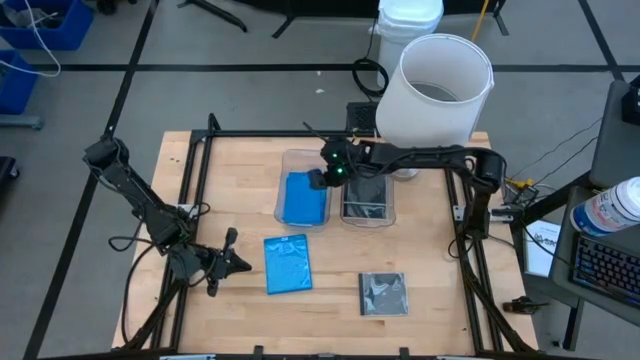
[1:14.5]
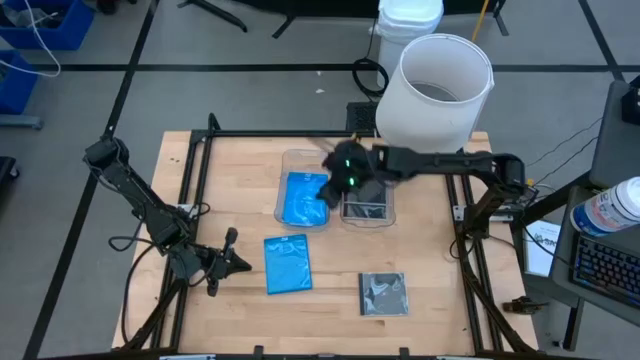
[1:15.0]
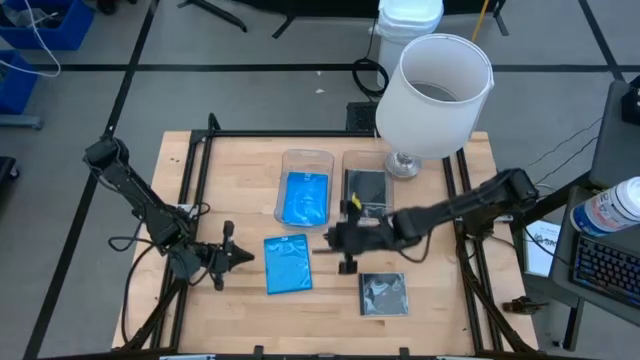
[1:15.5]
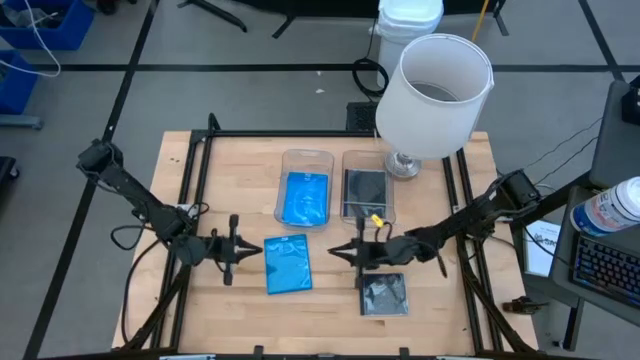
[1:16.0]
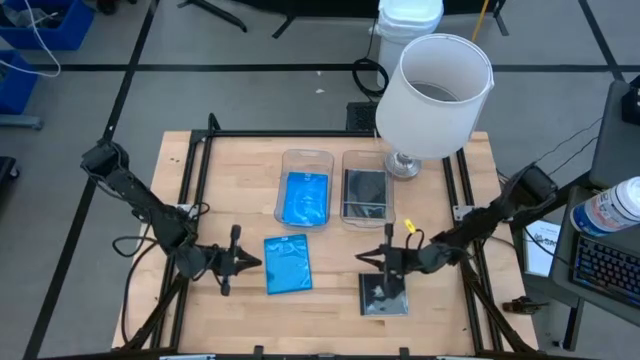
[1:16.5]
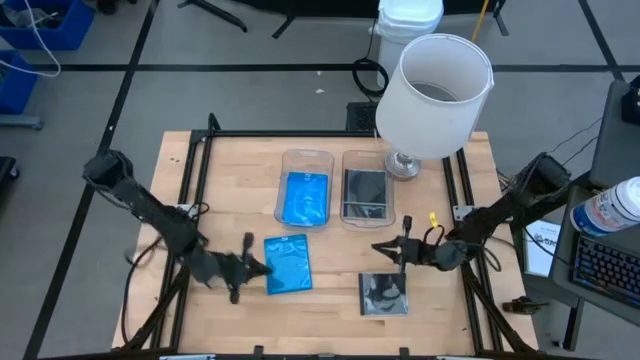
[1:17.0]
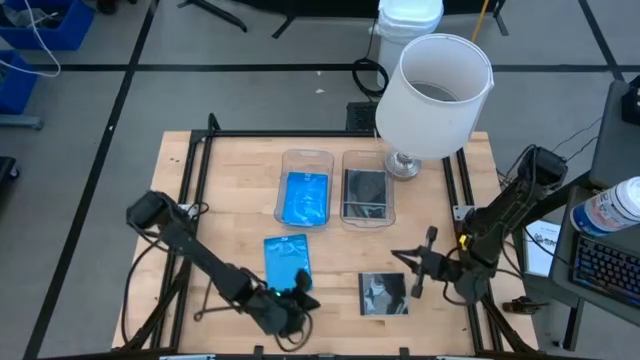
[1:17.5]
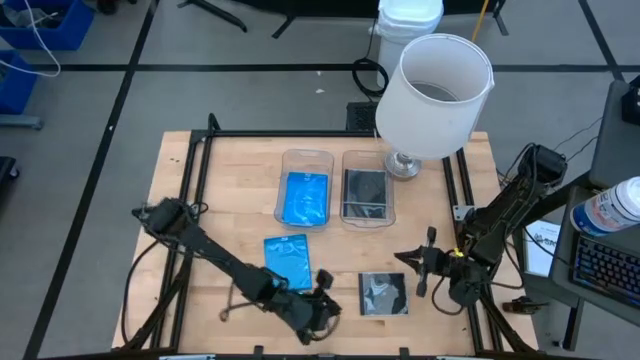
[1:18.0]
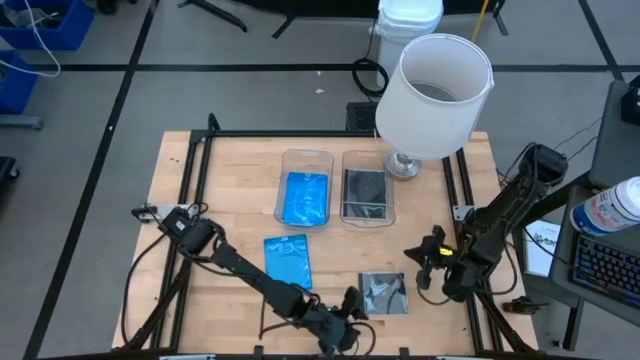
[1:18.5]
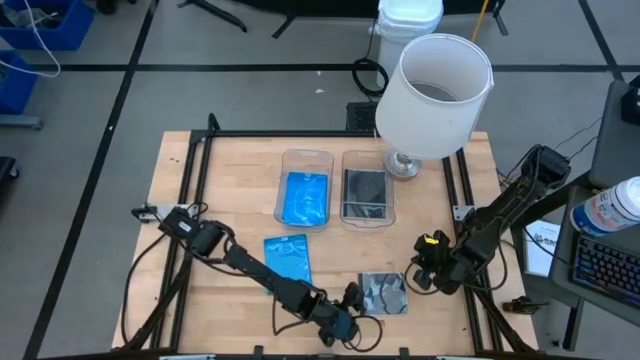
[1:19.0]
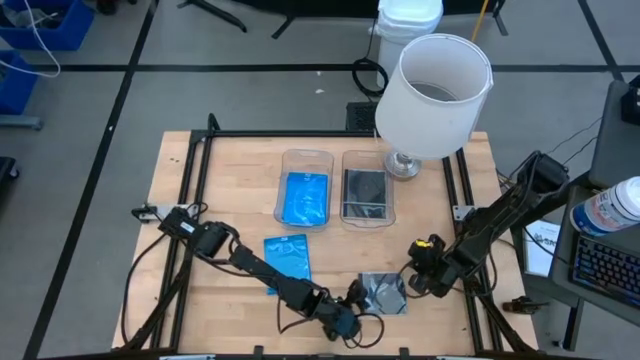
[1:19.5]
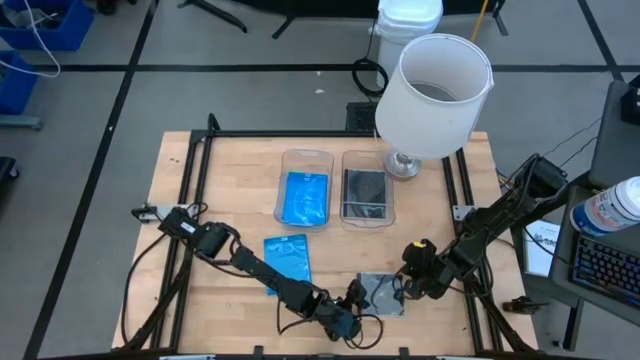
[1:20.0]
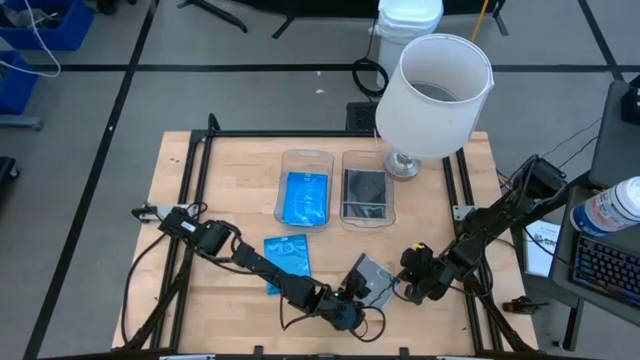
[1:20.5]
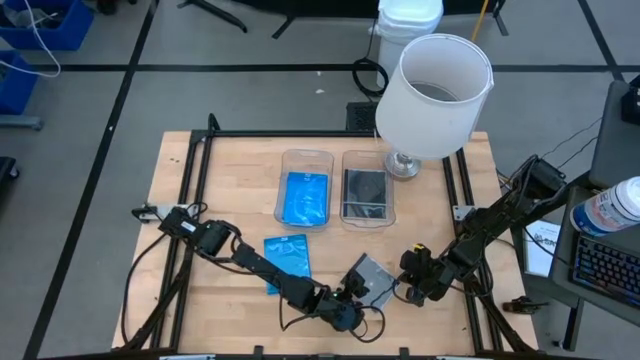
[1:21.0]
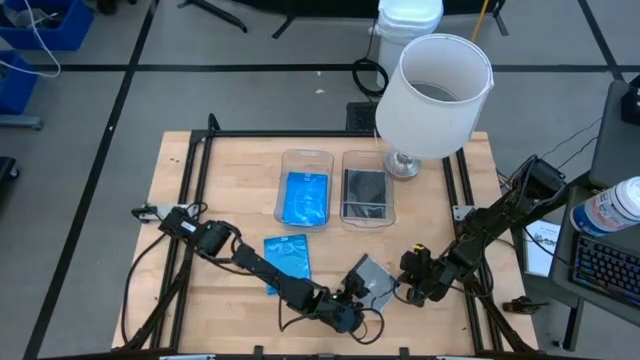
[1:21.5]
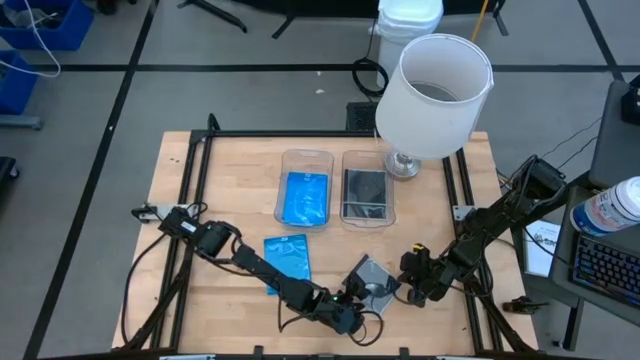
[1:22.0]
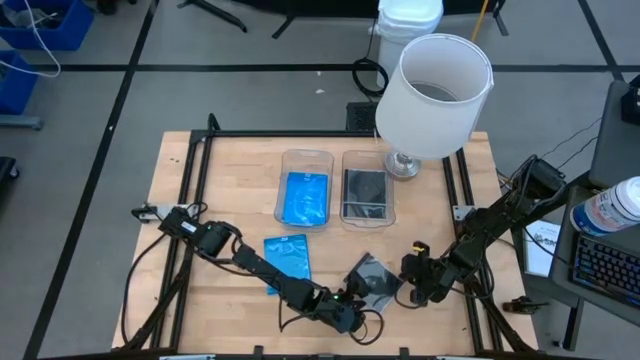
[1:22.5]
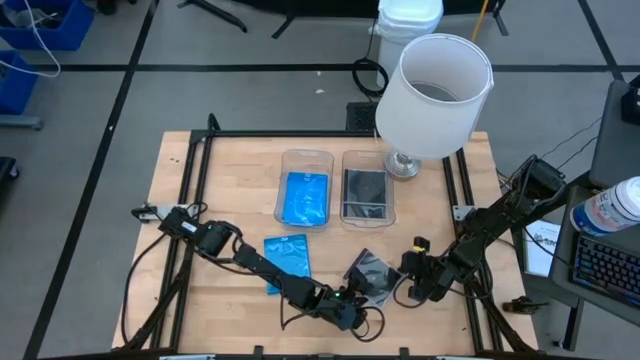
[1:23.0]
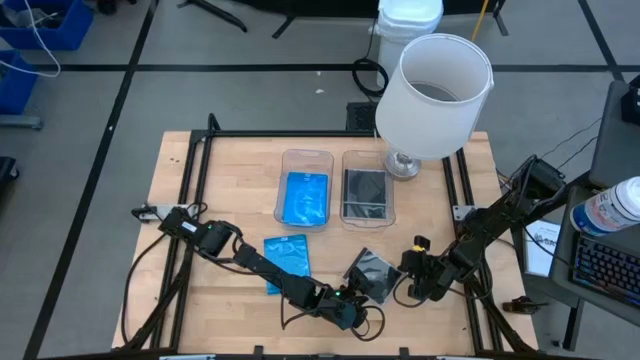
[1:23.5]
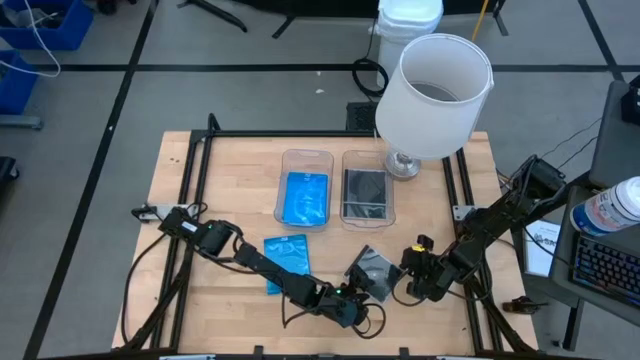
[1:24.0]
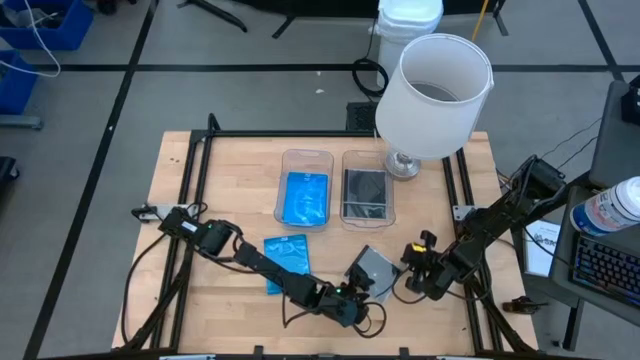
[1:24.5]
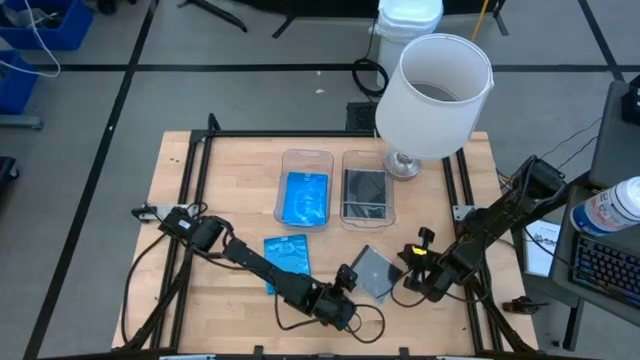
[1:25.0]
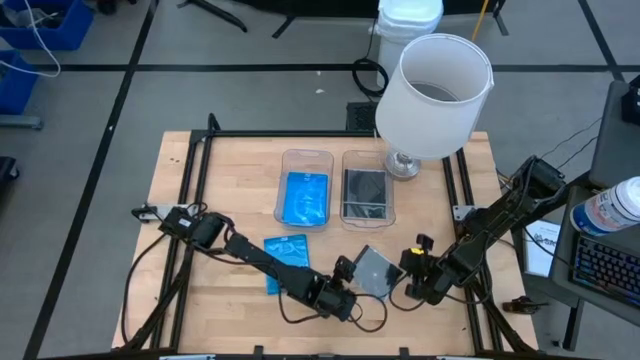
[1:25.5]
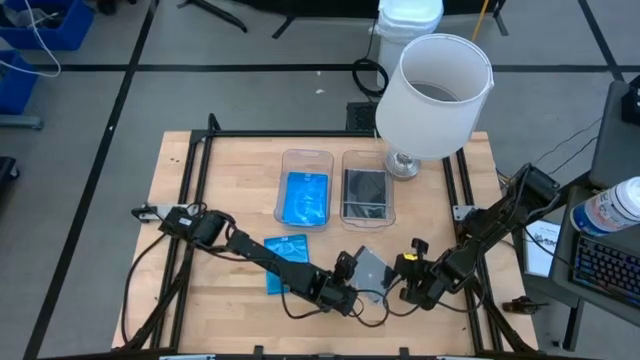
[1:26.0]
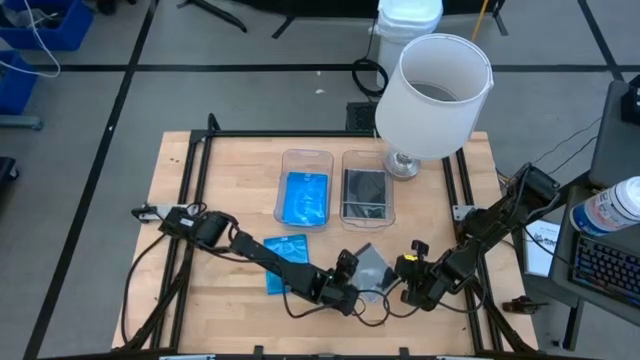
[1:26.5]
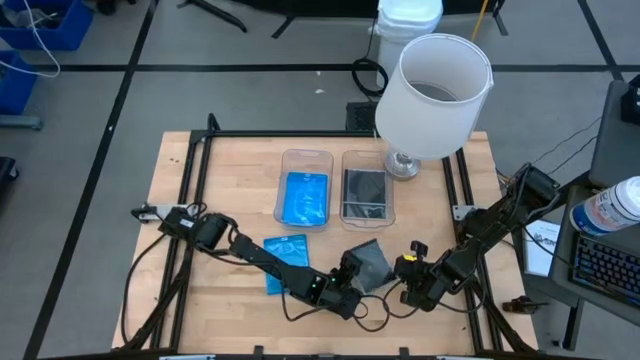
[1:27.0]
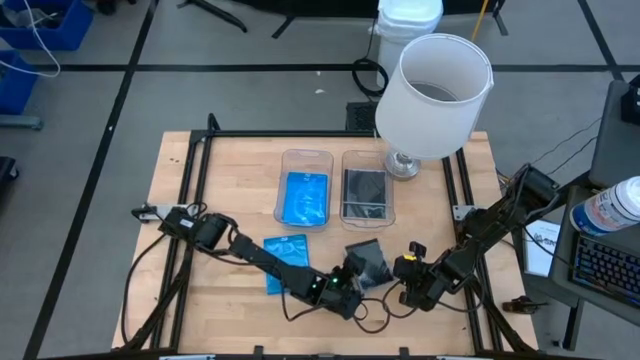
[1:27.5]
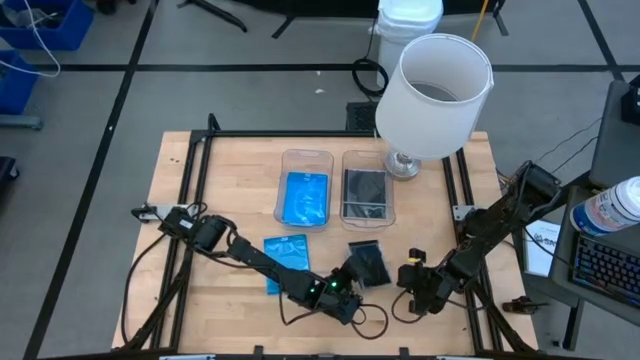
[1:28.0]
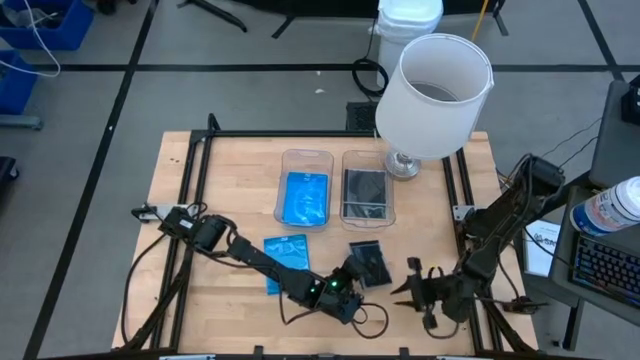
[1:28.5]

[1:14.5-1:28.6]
Task: Pick & place jewel cases by type
Put the black cd case into the right transparent bin

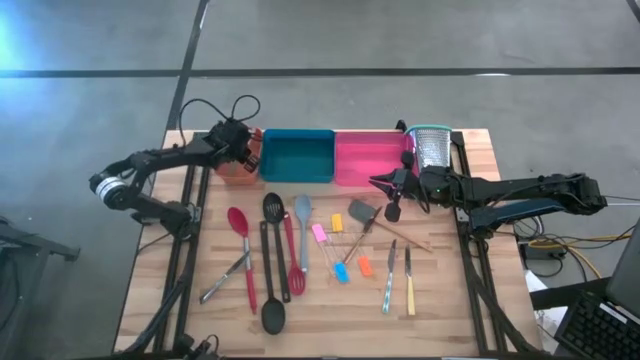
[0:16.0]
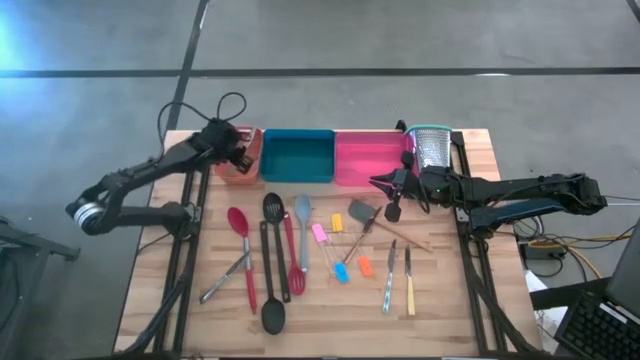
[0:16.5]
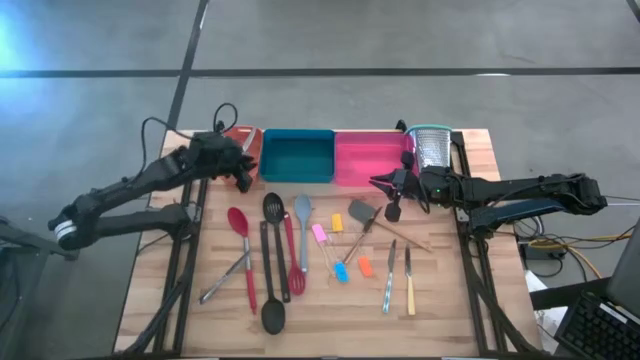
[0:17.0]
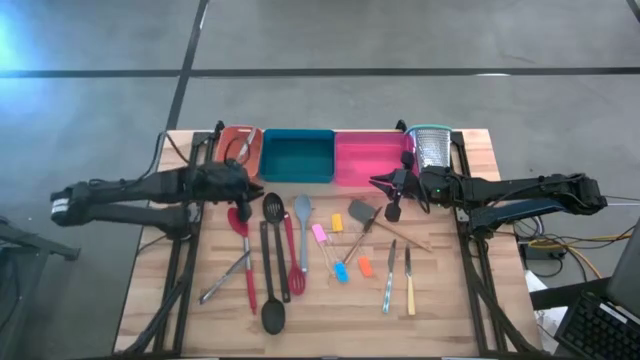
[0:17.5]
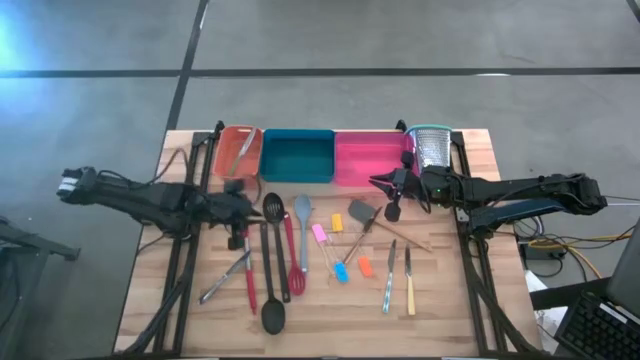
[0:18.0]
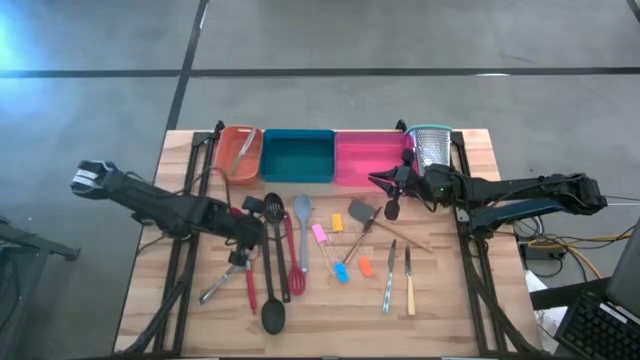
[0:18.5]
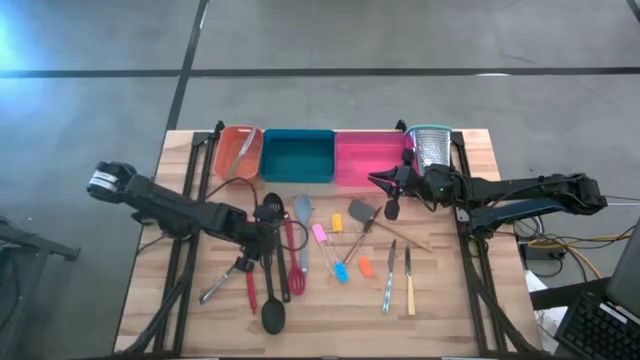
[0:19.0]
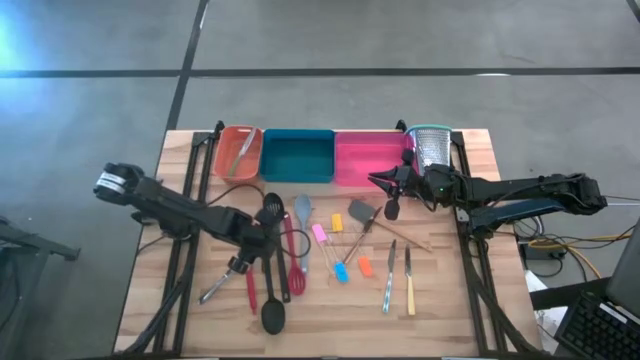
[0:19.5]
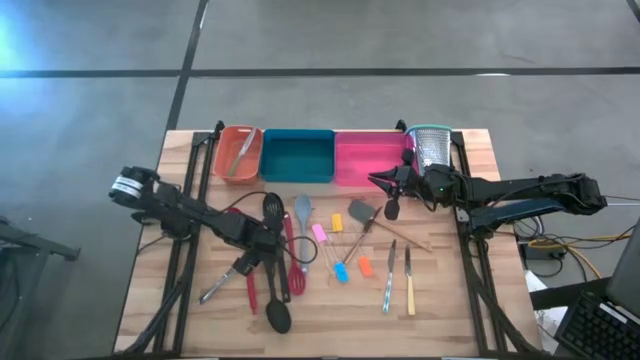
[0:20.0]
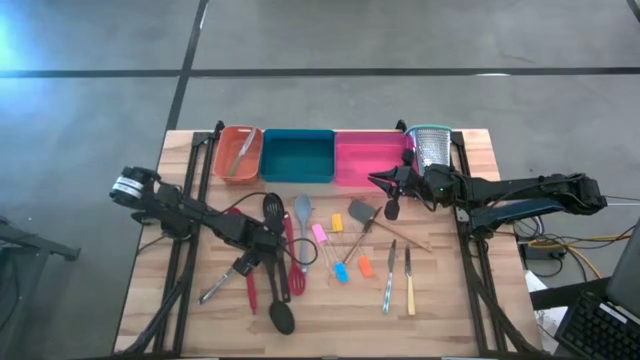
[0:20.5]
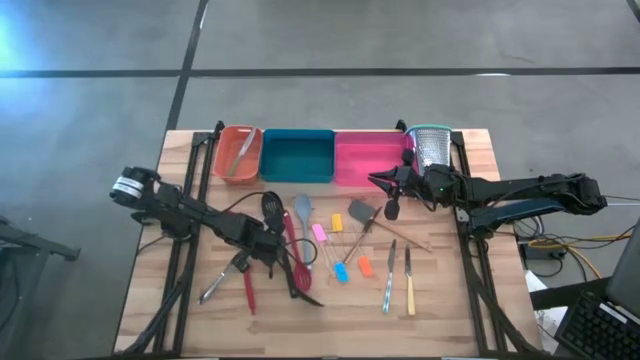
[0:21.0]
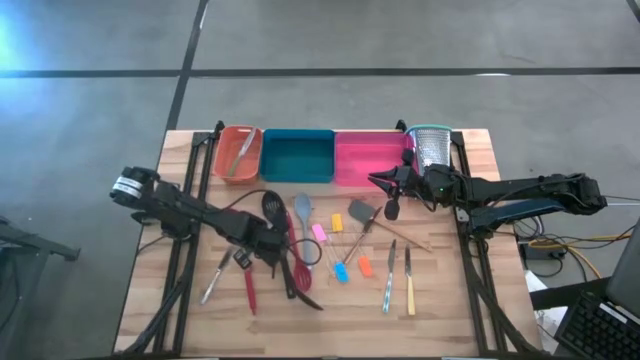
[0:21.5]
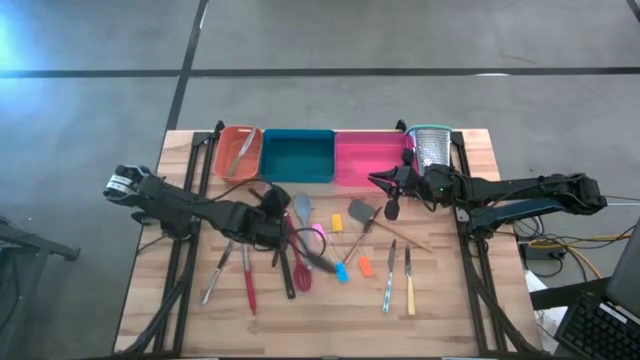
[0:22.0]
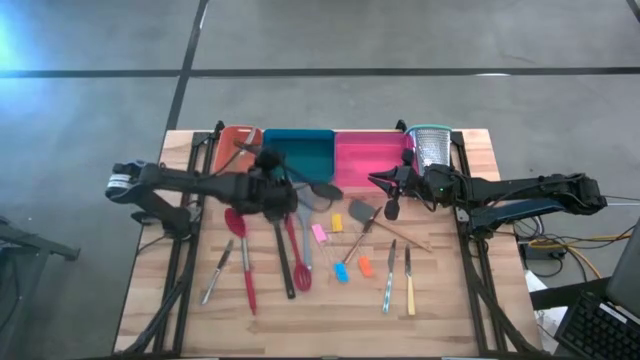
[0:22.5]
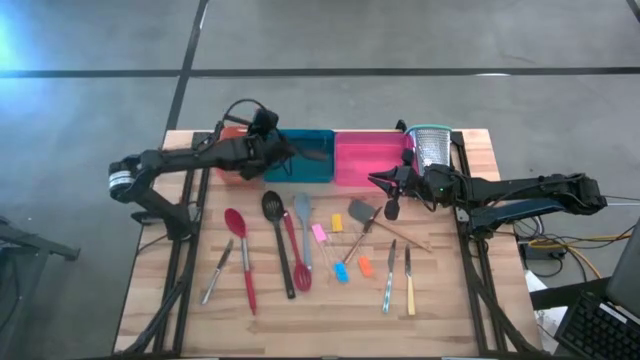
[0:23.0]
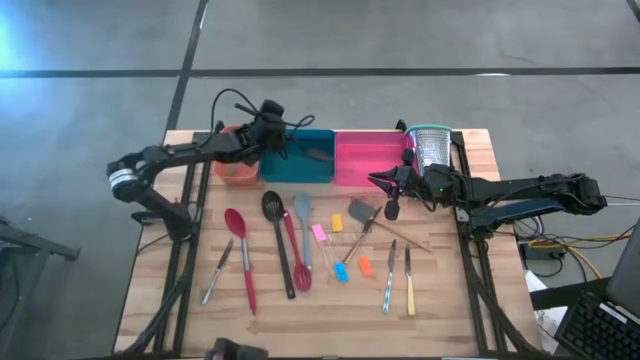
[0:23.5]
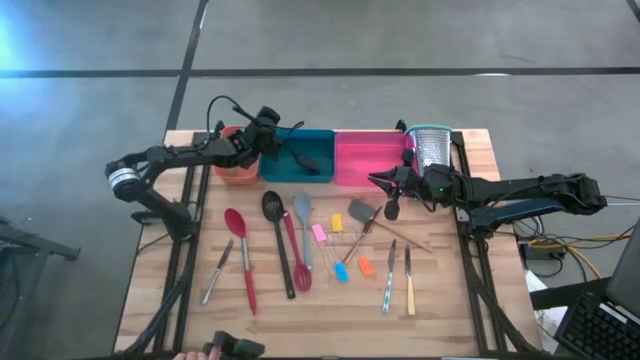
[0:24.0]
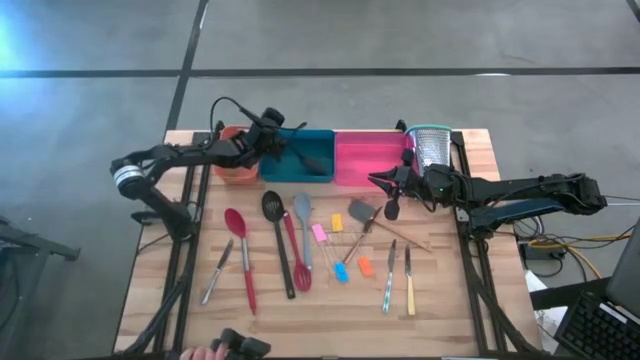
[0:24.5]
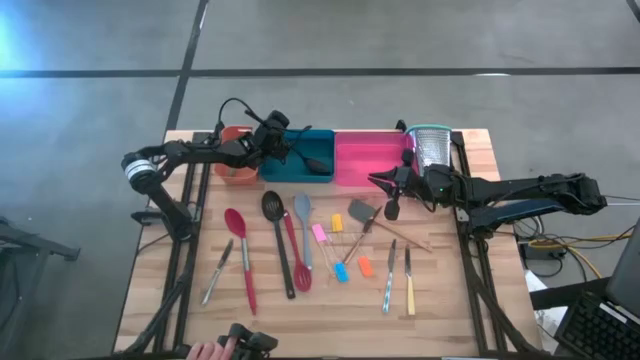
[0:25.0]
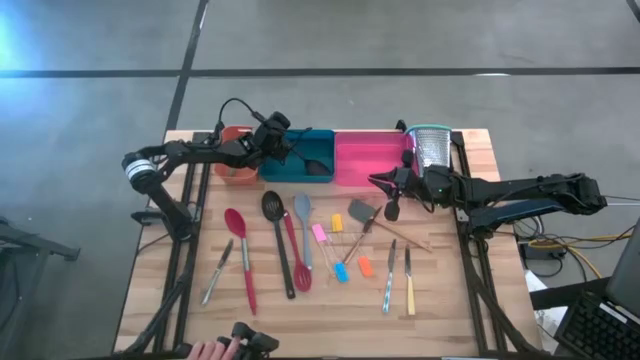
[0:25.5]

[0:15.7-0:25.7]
Task: Pick & Place Kitchen Items
Put the black serving spoon into the blue bin
